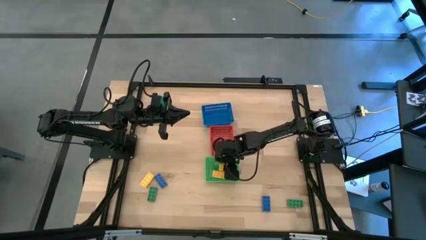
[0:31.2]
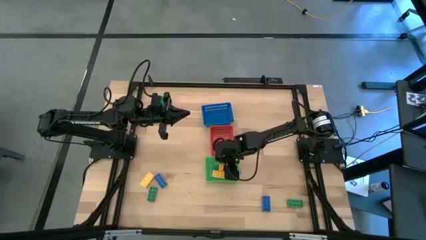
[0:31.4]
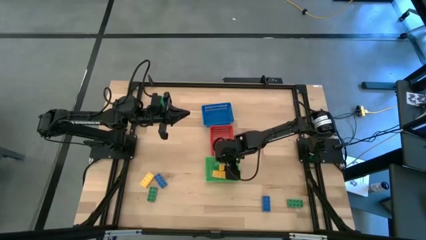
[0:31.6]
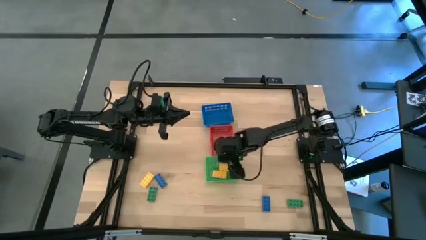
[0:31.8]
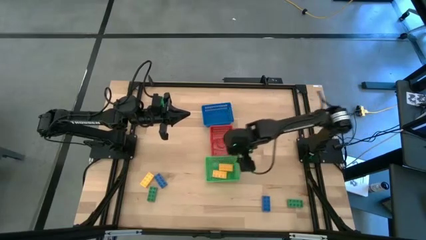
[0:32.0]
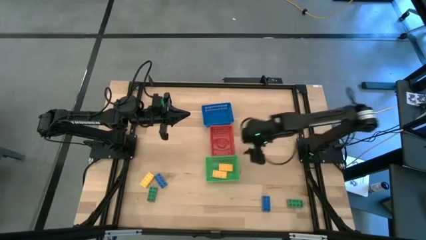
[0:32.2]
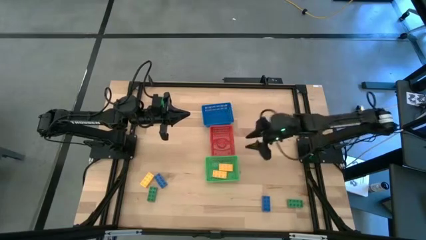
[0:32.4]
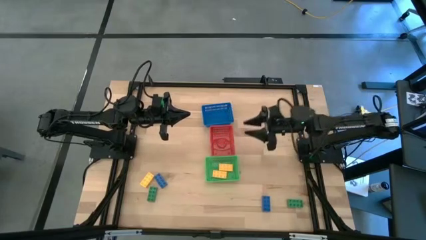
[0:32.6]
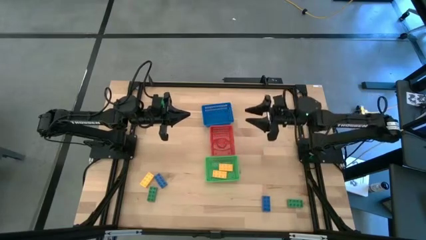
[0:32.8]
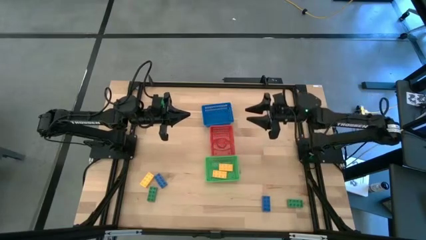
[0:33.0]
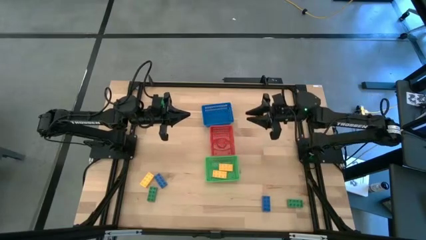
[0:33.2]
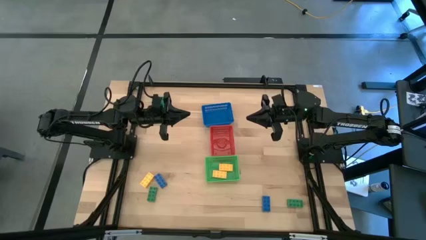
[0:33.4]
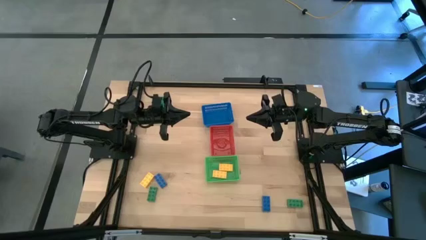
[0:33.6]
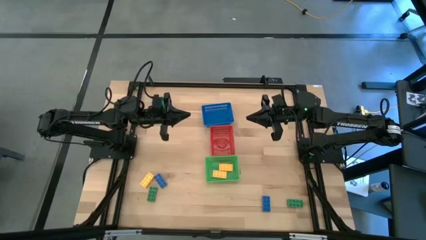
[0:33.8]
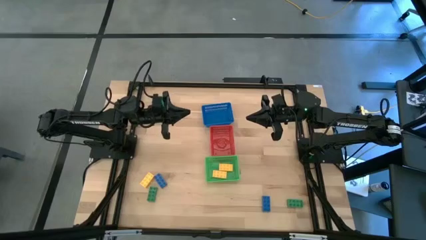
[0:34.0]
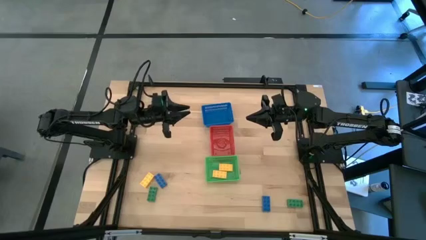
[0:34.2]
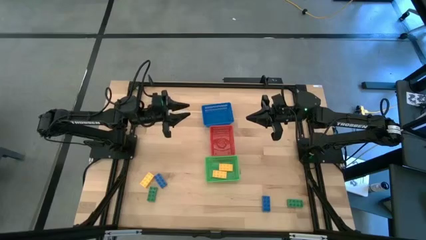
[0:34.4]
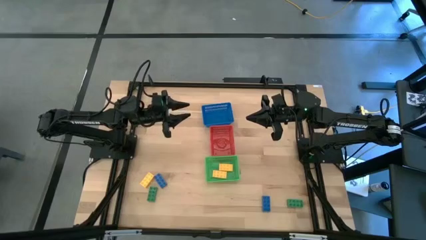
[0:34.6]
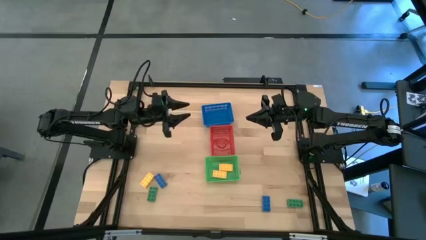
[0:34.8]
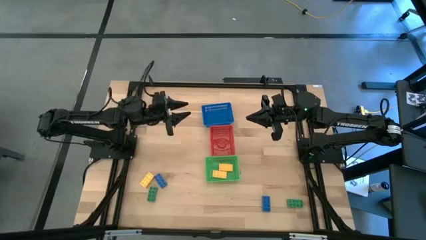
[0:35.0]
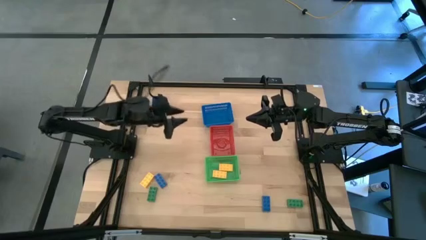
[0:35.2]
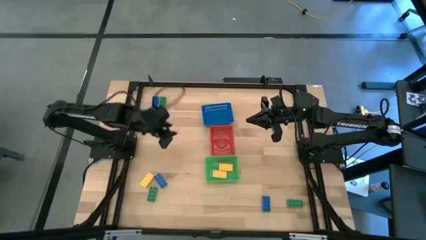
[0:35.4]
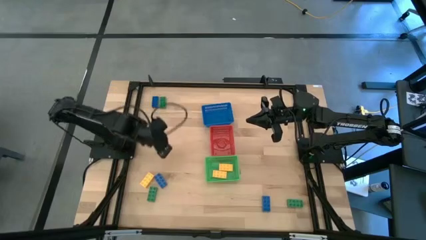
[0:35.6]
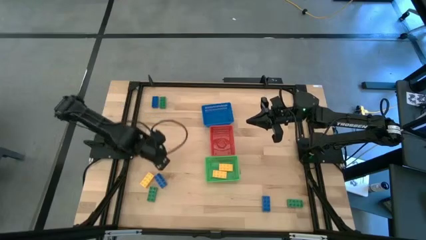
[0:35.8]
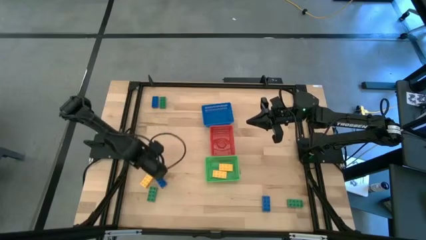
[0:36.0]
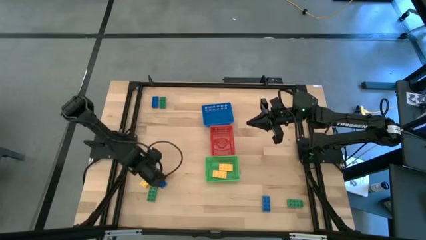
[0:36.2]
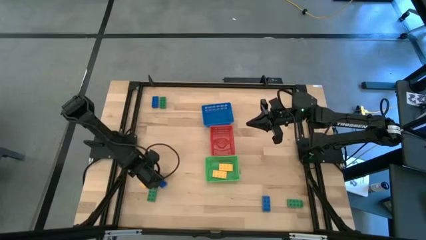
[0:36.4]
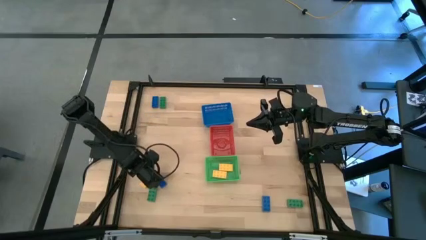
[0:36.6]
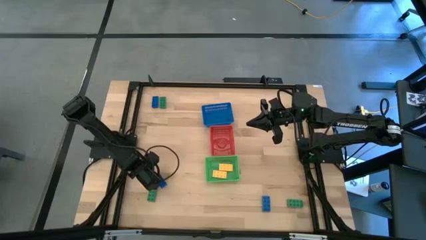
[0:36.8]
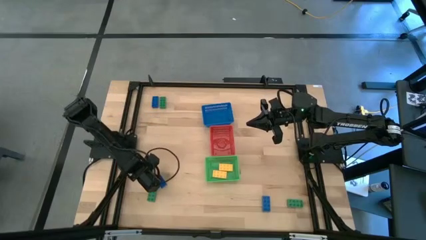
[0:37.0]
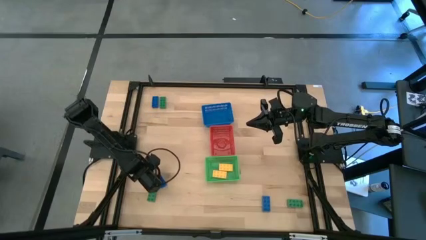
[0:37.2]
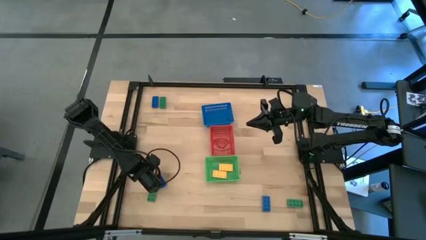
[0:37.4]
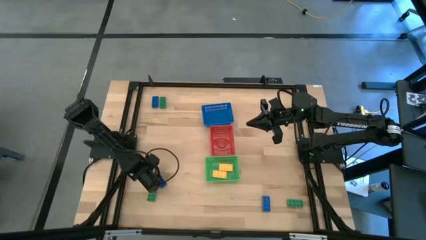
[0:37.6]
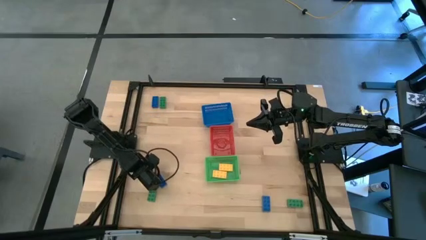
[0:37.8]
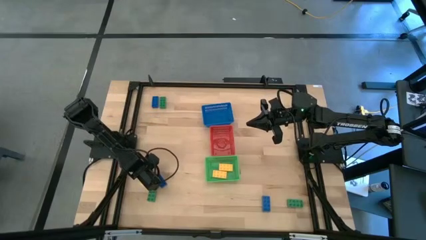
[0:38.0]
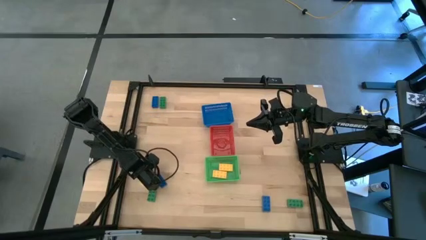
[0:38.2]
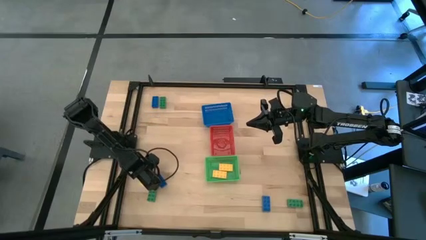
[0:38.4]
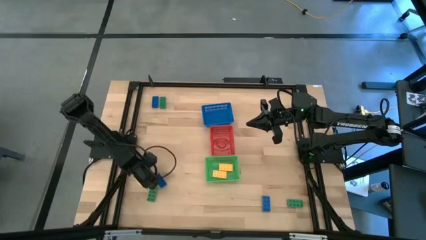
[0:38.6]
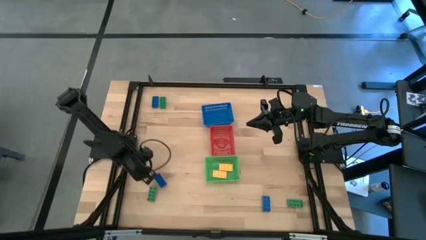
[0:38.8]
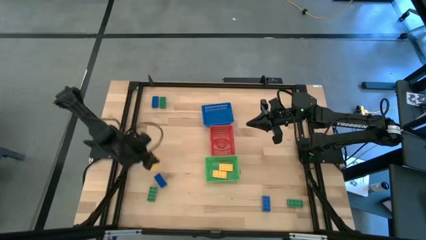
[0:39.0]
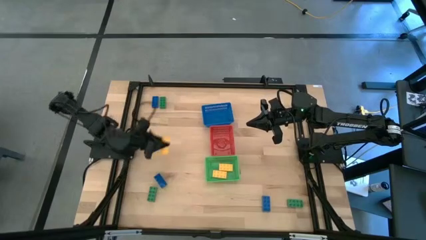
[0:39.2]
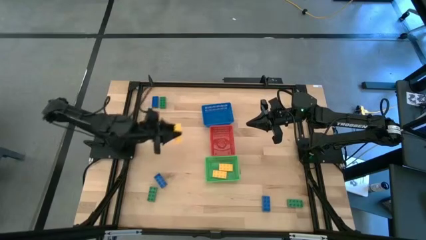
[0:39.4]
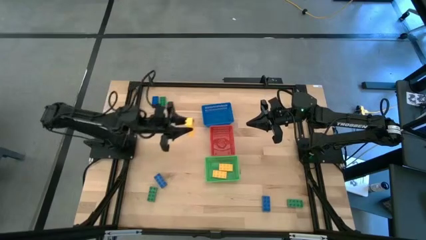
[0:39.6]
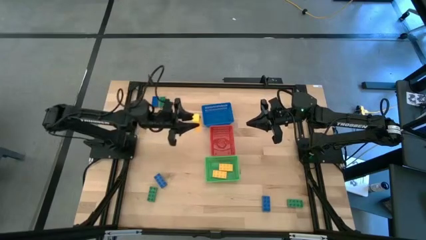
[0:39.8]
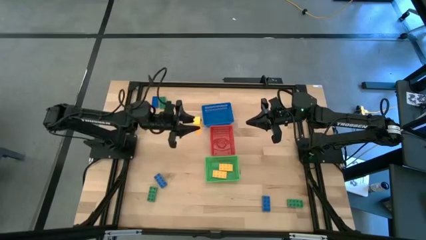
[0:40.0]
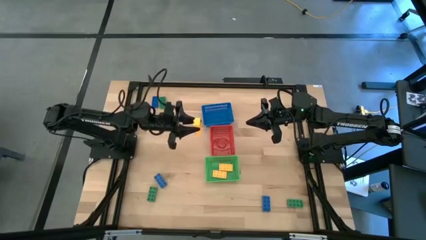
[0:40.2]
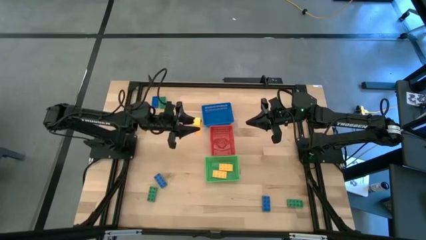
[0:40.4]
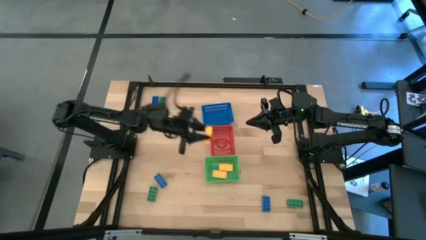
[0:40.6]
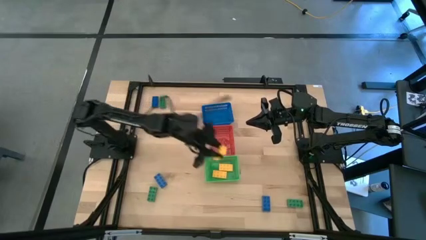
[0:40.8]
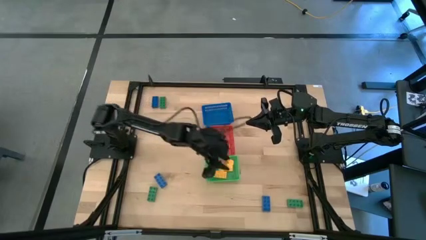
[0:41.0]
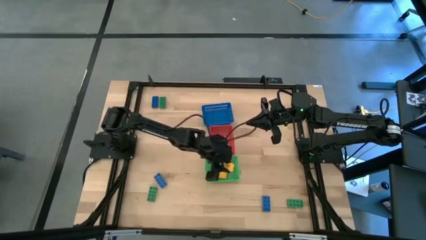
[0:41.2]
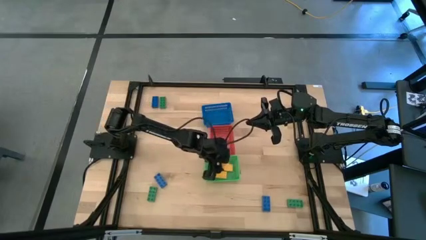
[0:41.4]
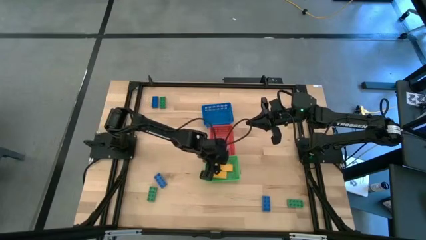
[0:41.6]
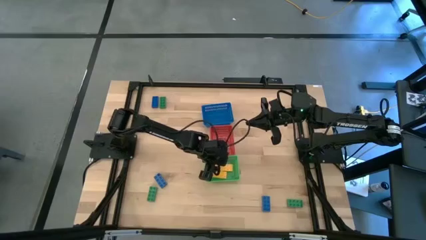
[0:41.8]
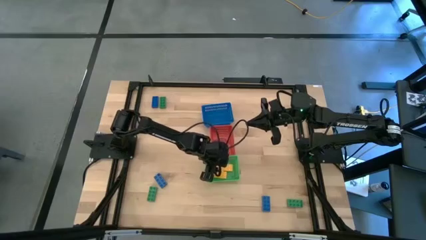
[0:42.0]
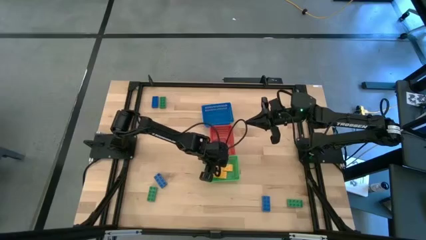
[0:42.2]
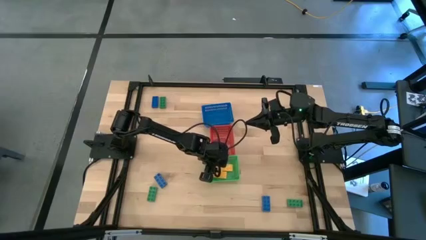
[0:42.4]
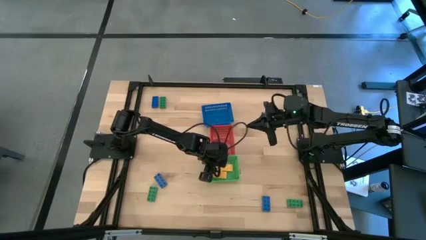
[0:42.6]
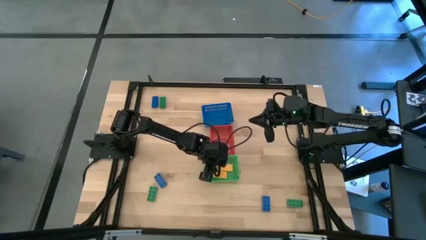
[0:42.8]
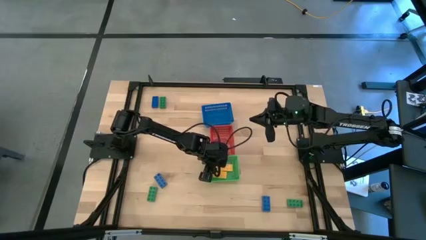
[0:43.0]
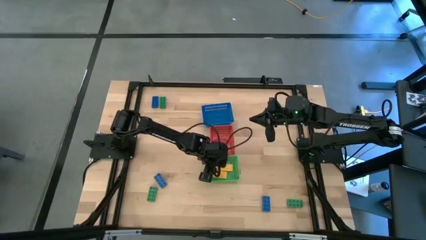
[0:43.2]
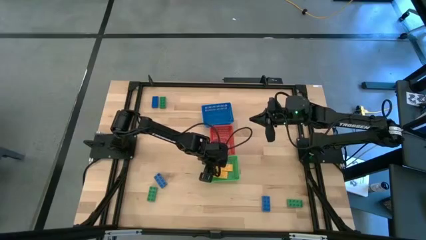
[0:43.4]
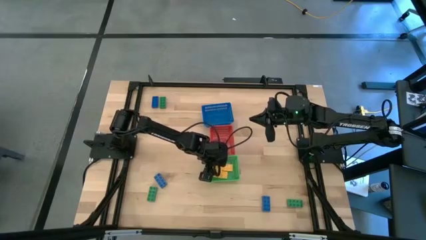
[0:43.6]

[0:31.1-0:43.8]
Task: Sort & place blocks by color
Put the yellow game piece into the green basket
